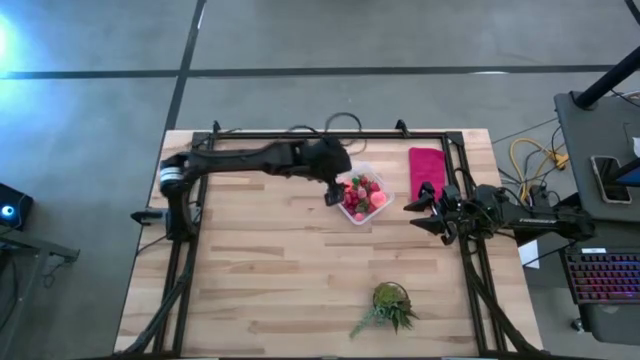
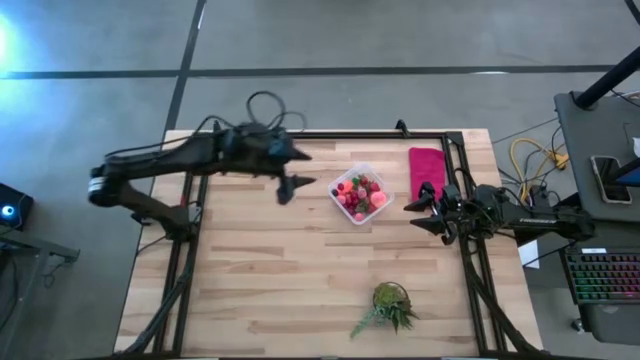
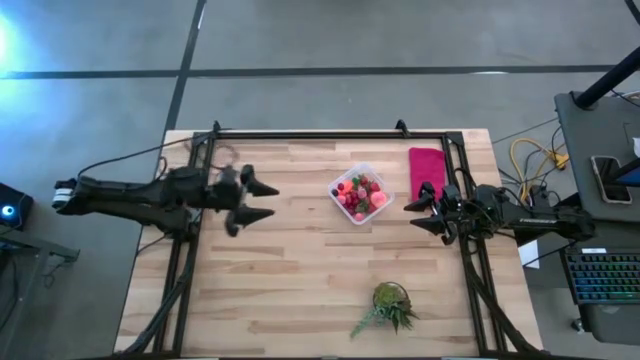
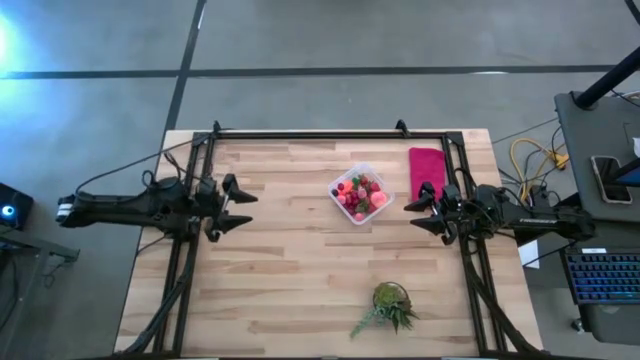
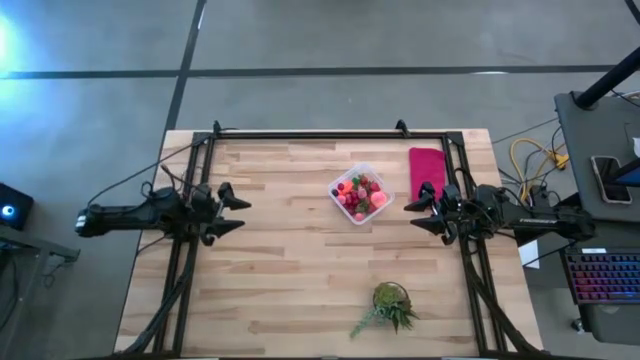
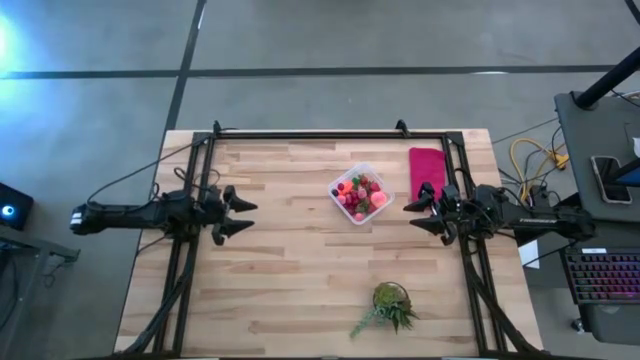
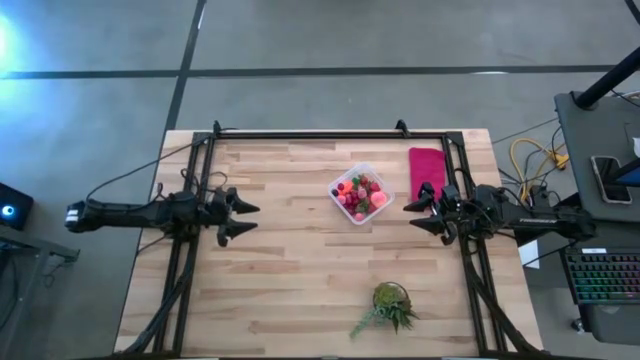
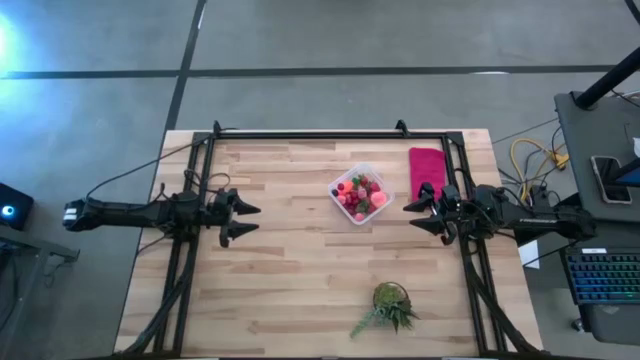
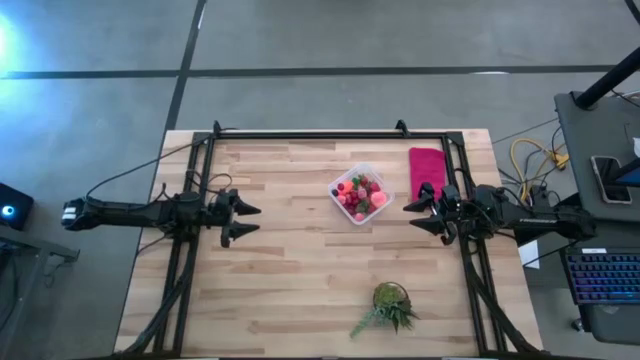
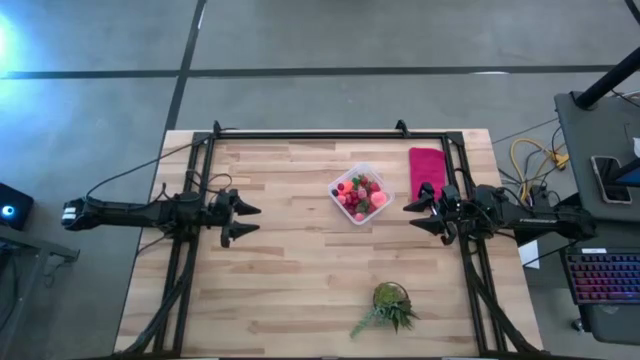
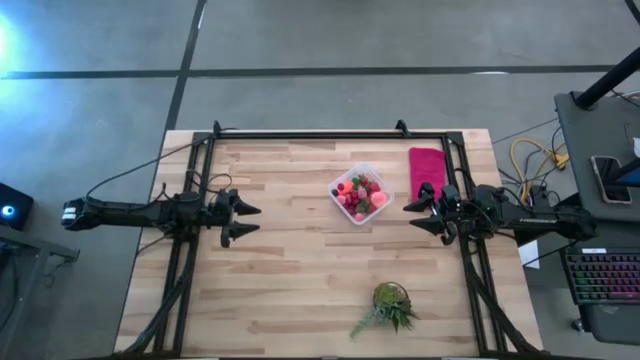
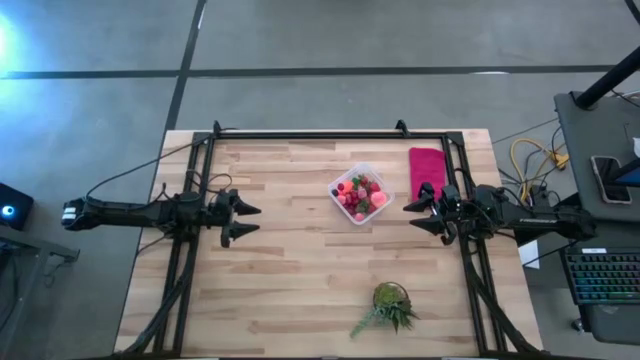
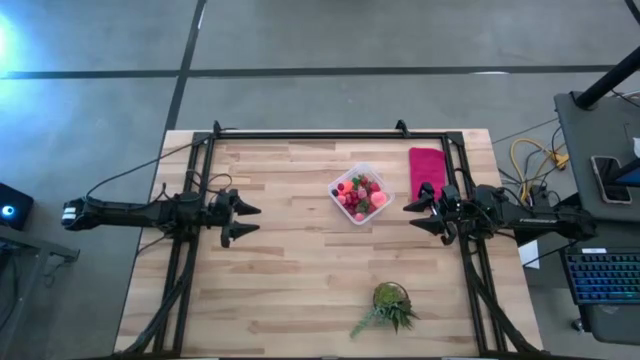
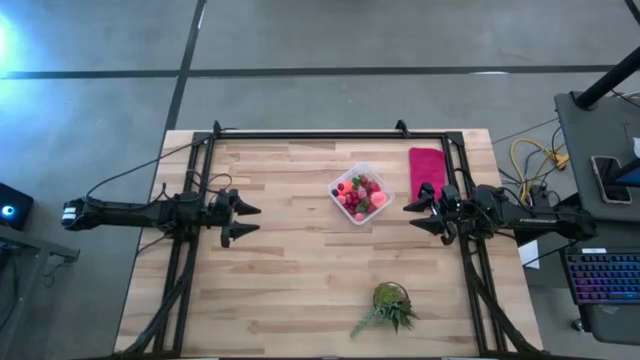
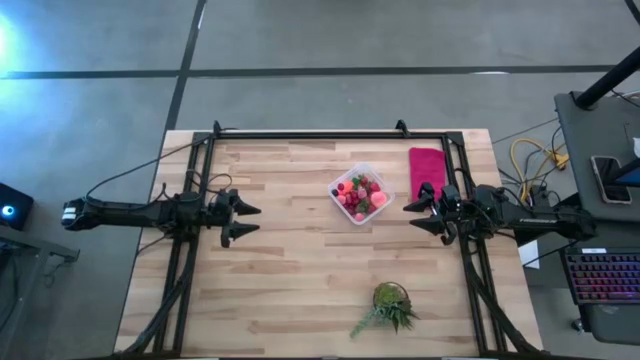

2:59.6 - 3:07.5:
Task: Pick and placing Produce into tupperware
Return to Home Position

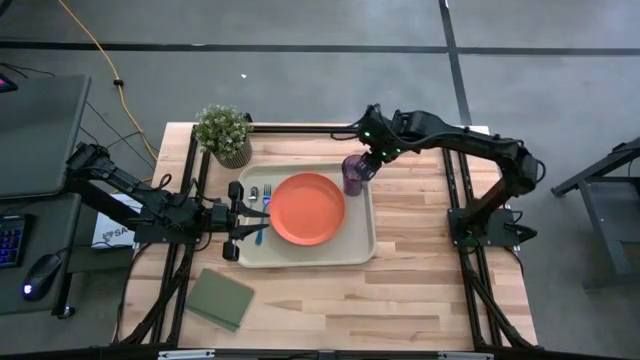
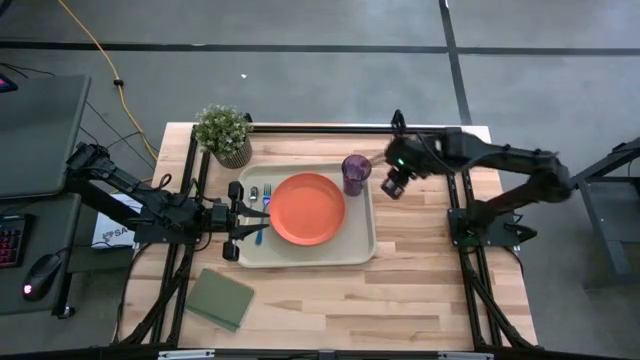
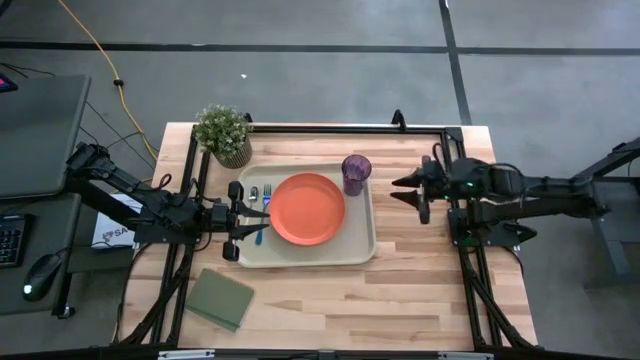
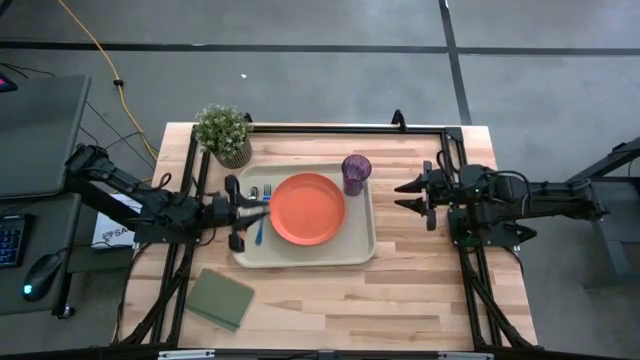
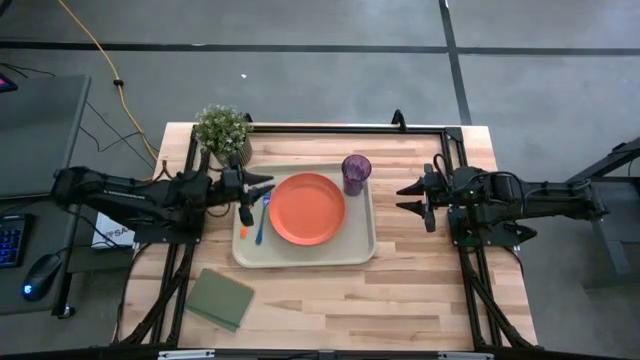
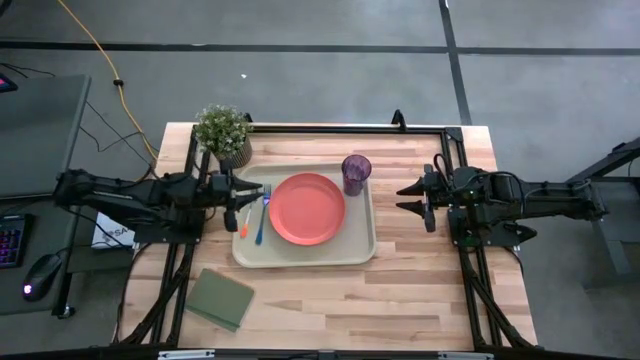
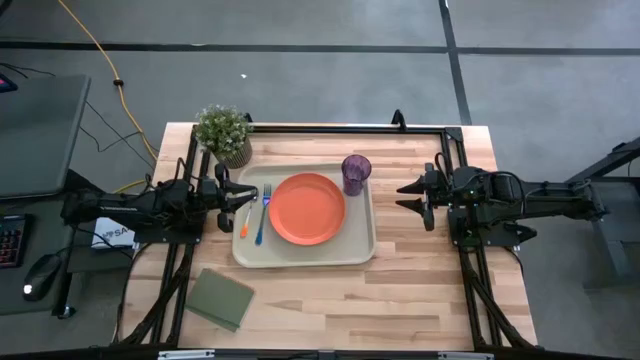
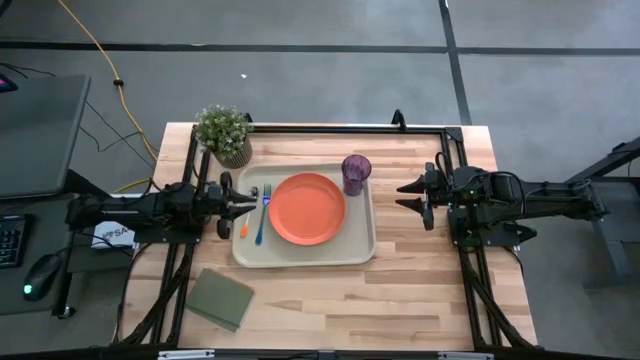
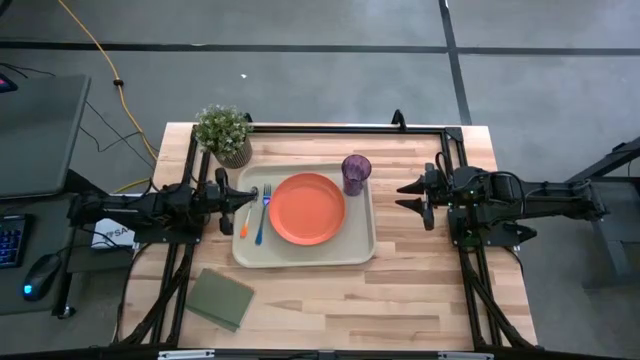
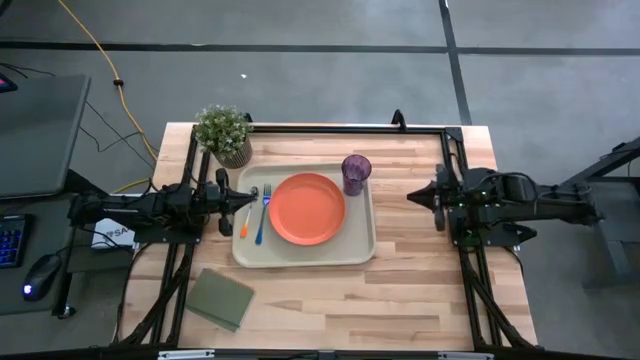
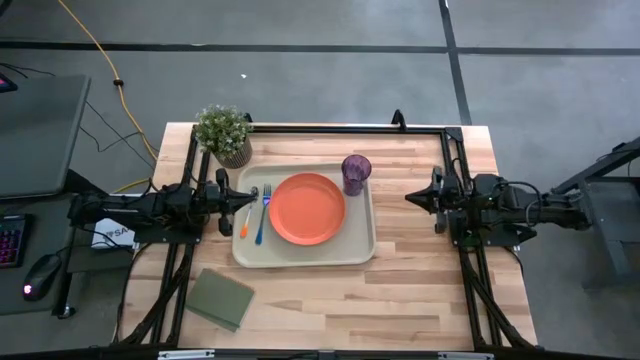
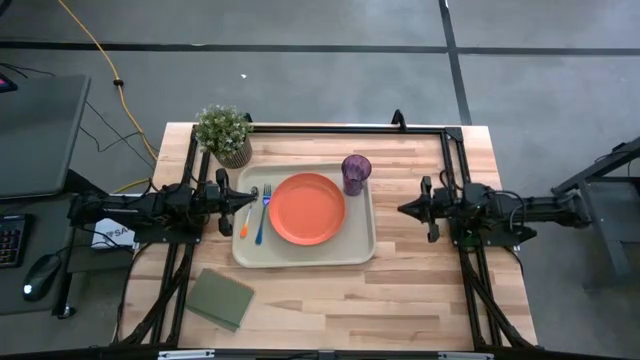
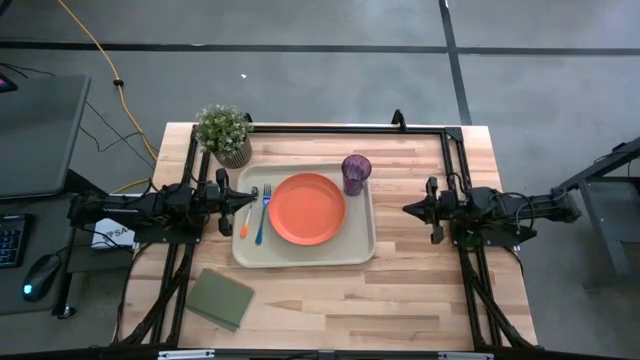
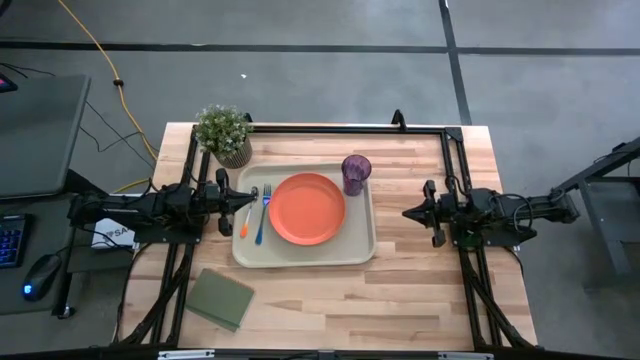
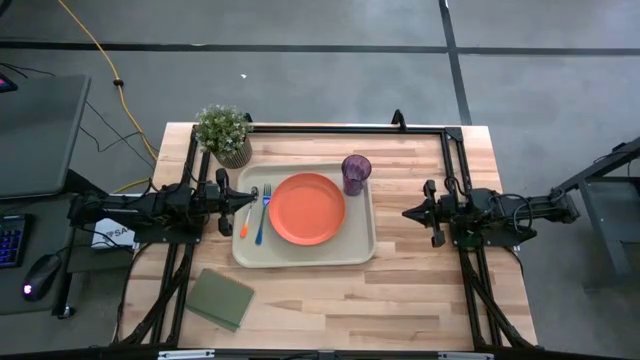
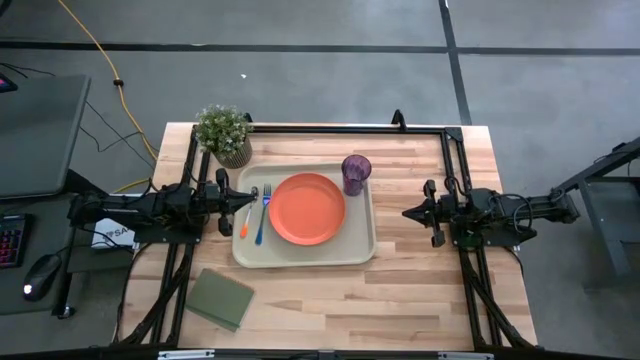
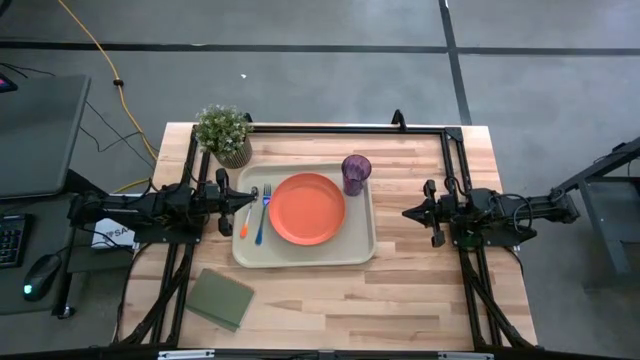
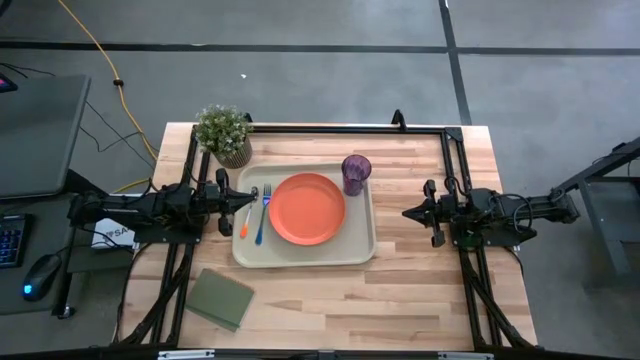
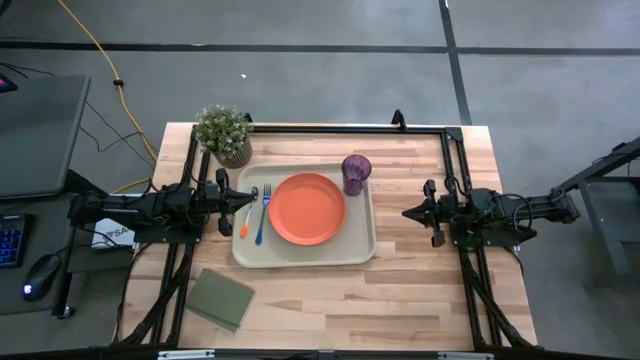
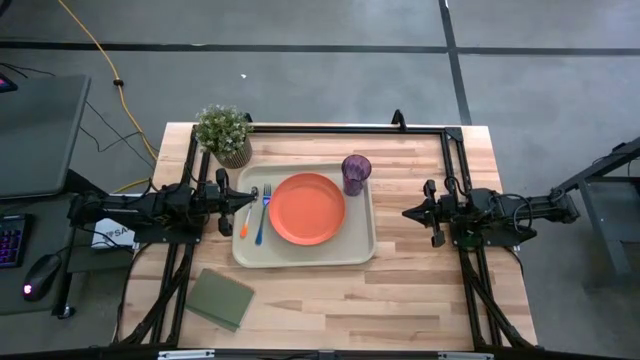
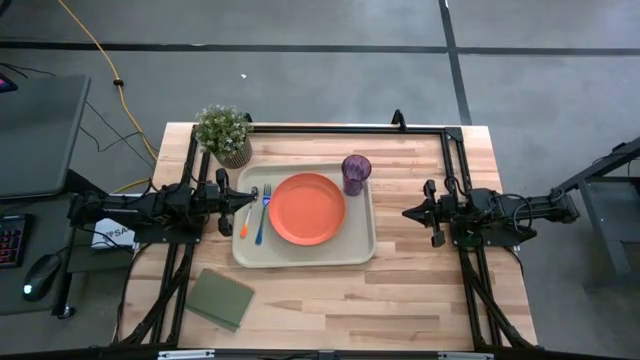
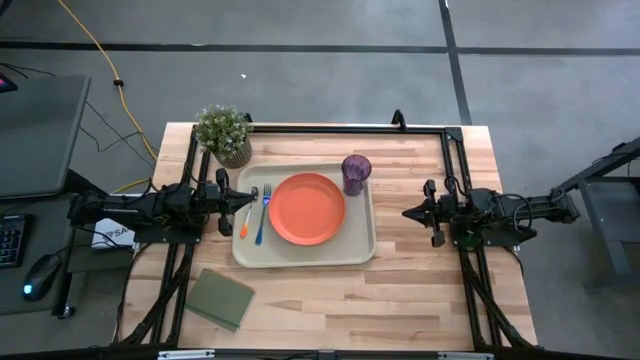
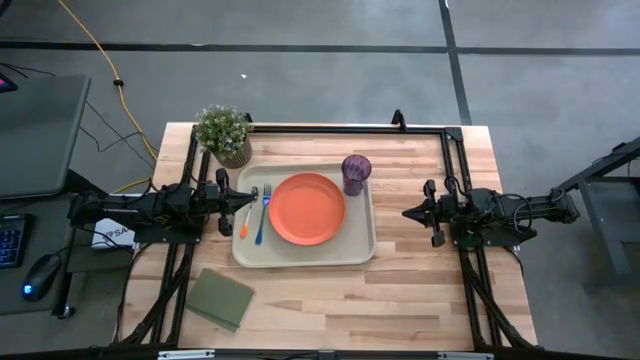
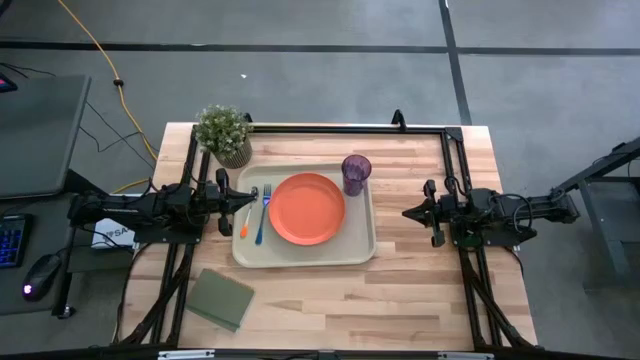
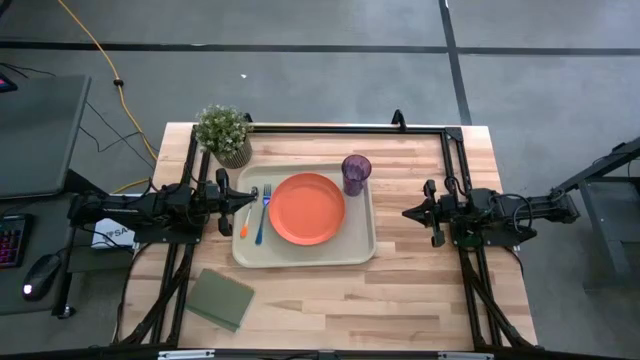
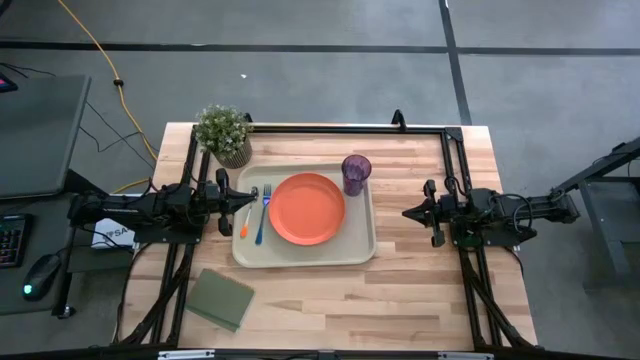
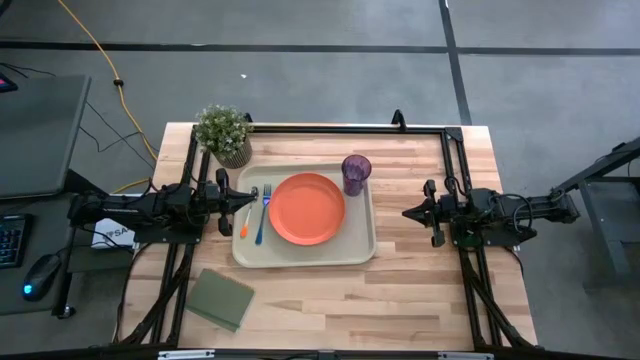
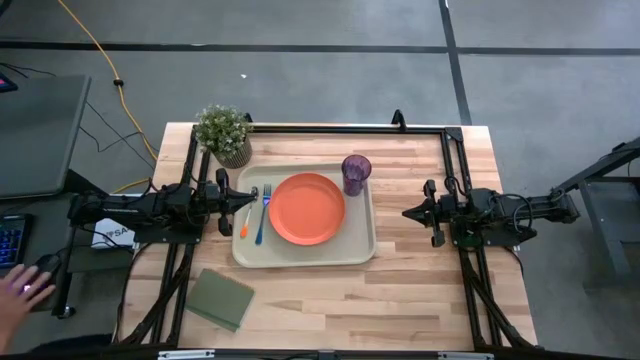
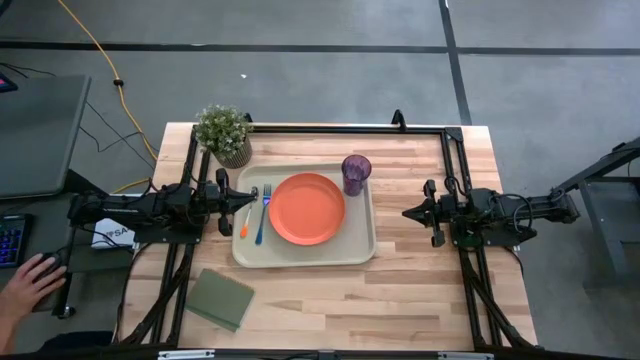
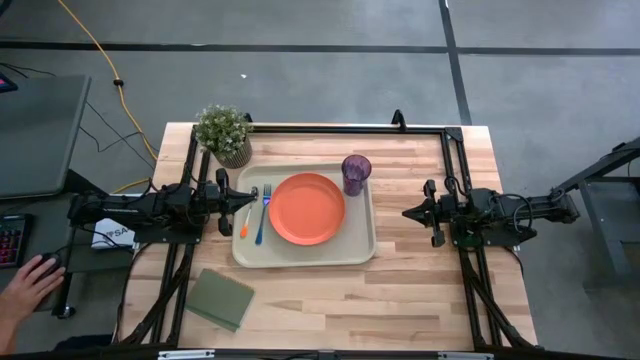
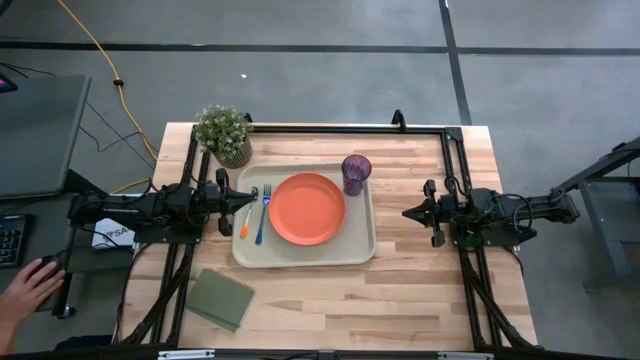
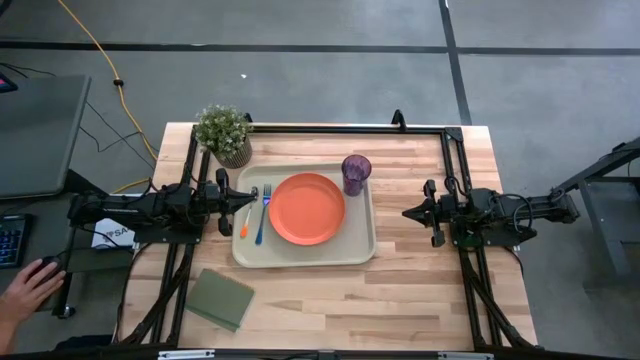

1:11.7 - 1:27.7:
Task: Pick and place plate/cup/fork/spoon on tray
Return to Home Position
